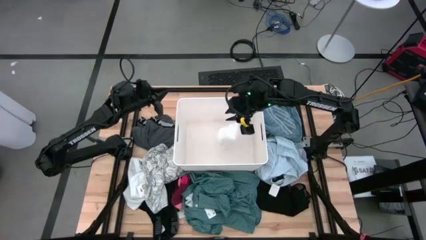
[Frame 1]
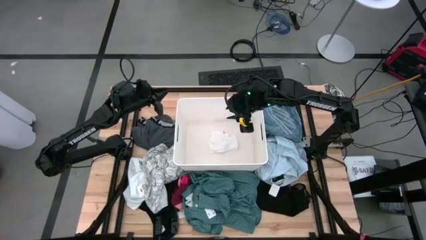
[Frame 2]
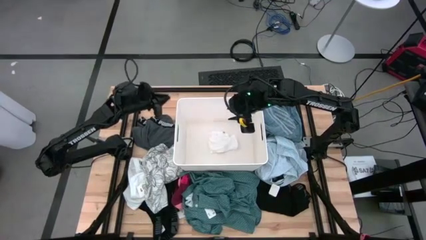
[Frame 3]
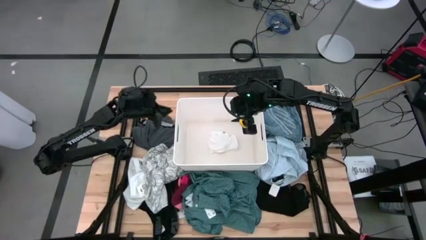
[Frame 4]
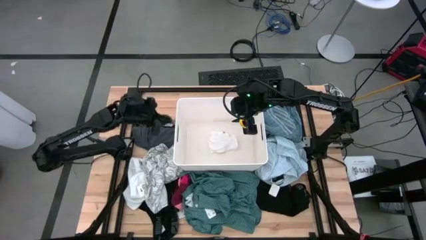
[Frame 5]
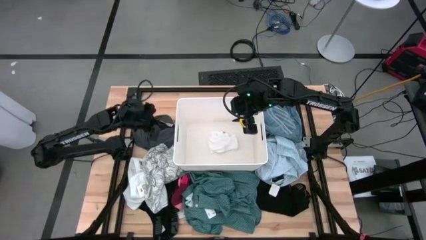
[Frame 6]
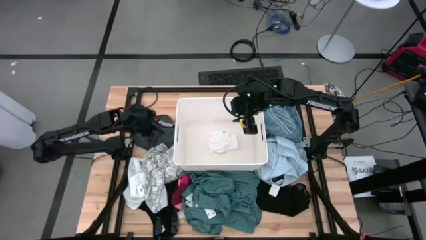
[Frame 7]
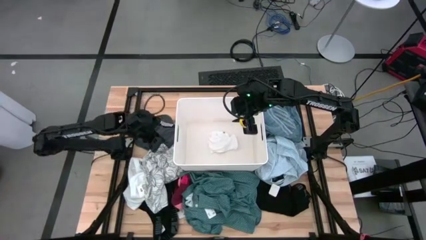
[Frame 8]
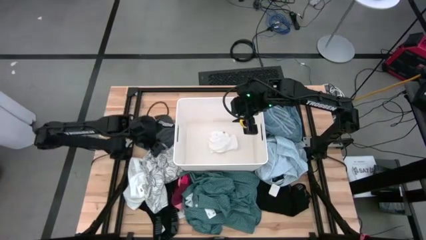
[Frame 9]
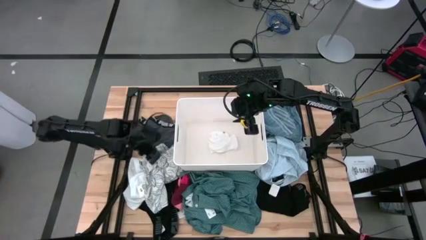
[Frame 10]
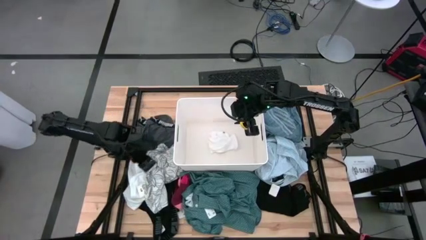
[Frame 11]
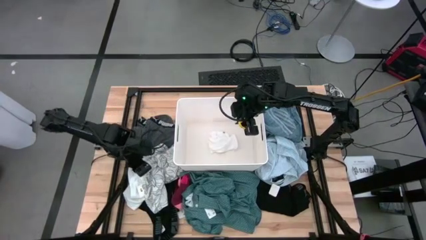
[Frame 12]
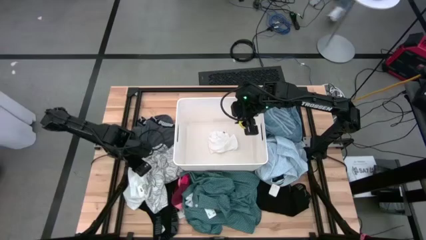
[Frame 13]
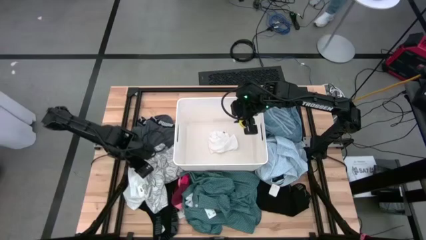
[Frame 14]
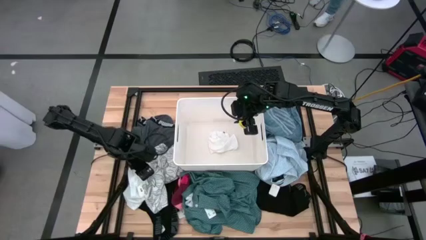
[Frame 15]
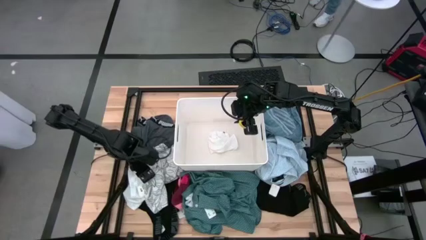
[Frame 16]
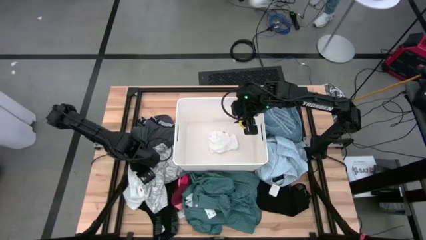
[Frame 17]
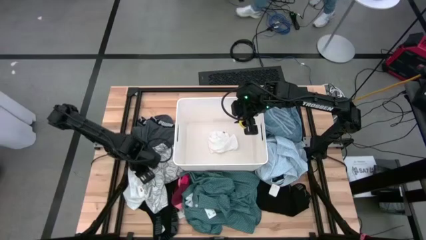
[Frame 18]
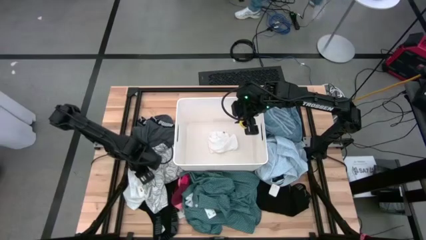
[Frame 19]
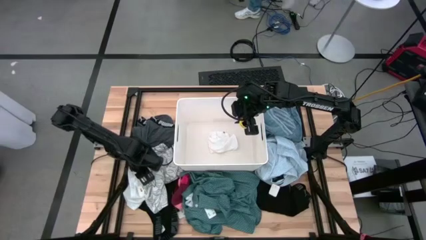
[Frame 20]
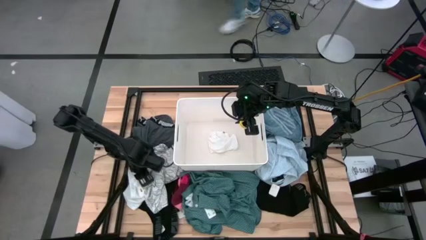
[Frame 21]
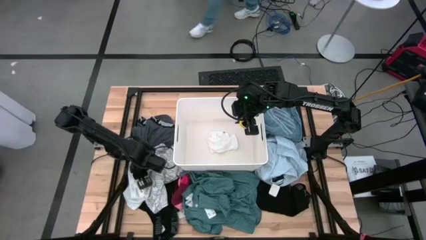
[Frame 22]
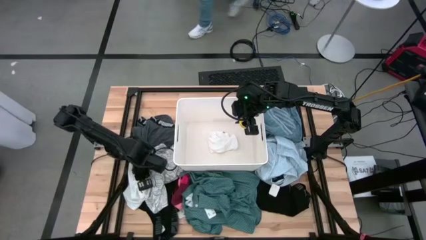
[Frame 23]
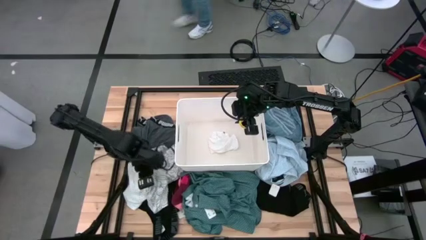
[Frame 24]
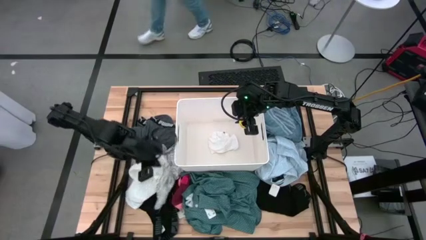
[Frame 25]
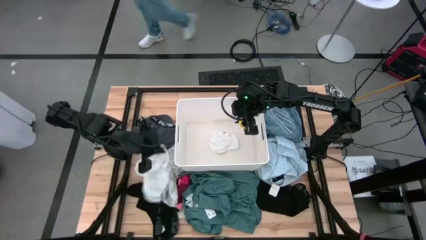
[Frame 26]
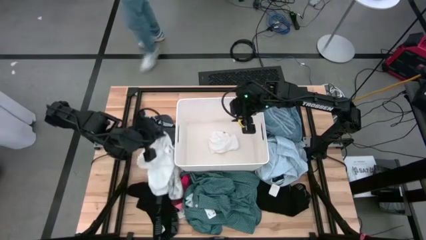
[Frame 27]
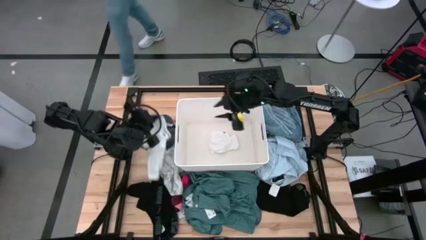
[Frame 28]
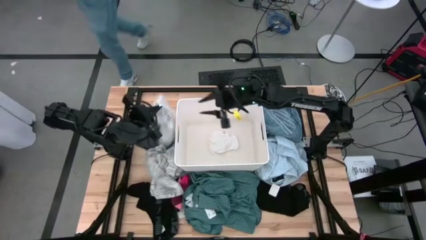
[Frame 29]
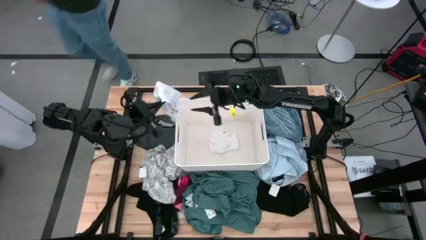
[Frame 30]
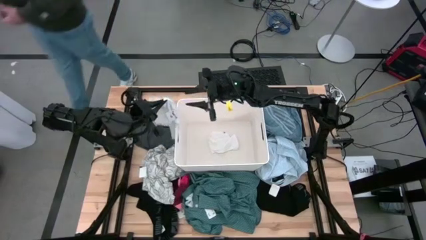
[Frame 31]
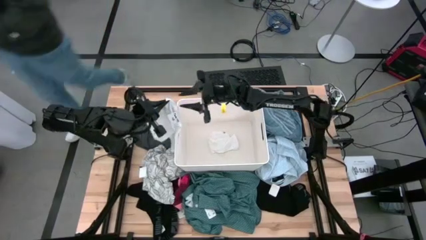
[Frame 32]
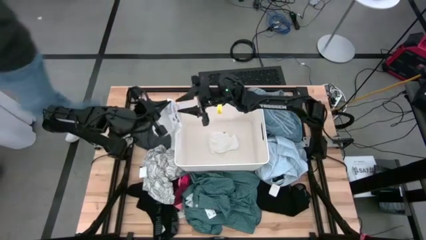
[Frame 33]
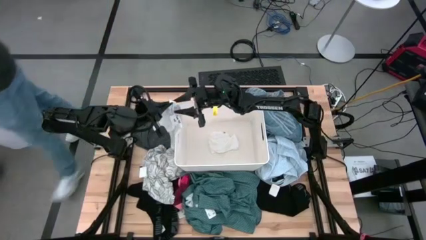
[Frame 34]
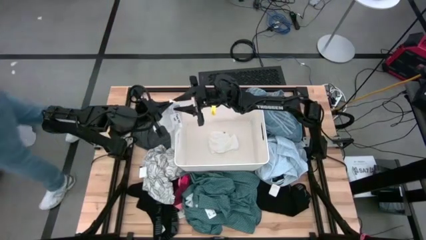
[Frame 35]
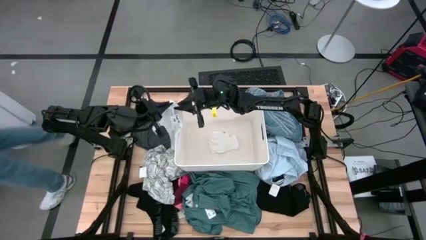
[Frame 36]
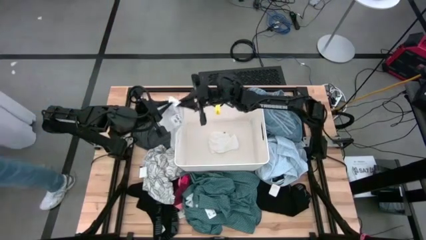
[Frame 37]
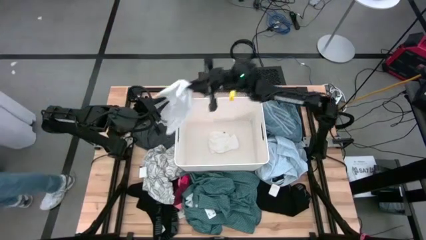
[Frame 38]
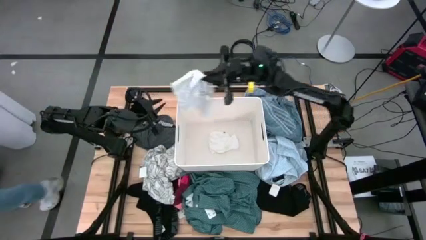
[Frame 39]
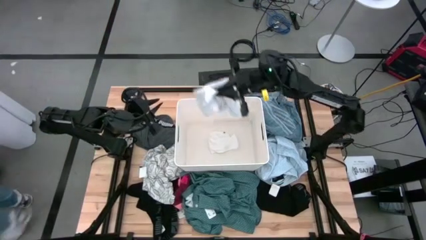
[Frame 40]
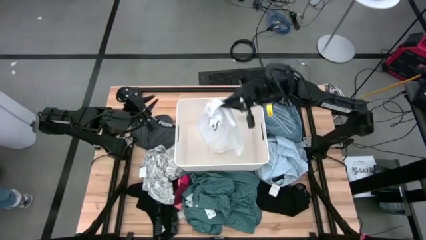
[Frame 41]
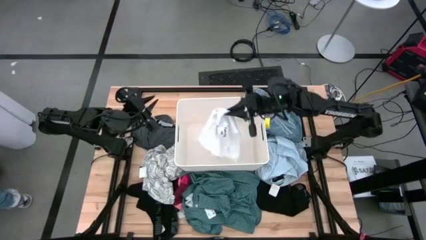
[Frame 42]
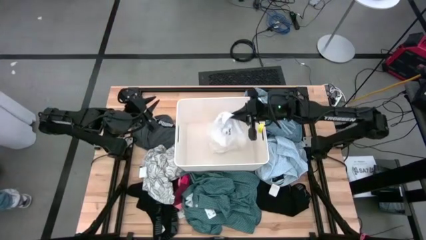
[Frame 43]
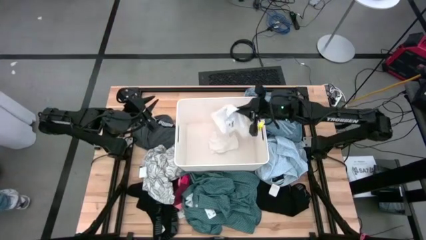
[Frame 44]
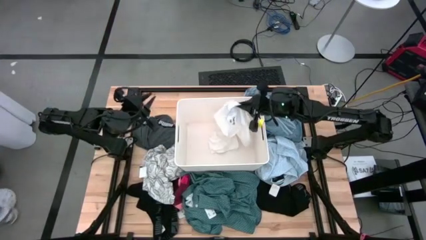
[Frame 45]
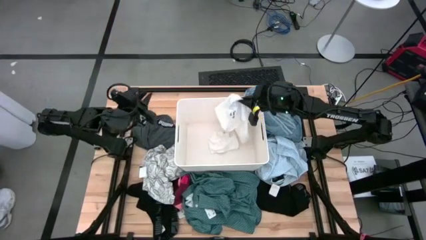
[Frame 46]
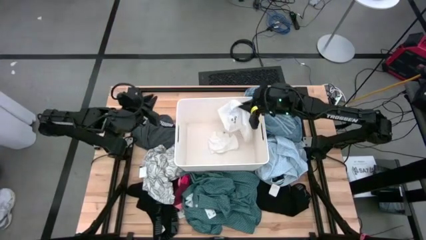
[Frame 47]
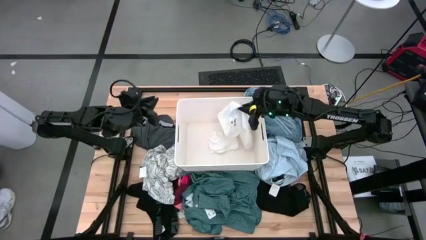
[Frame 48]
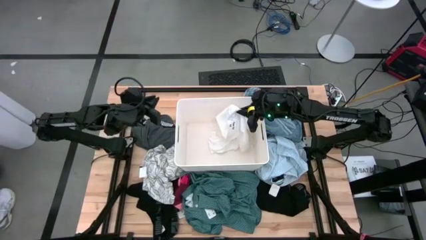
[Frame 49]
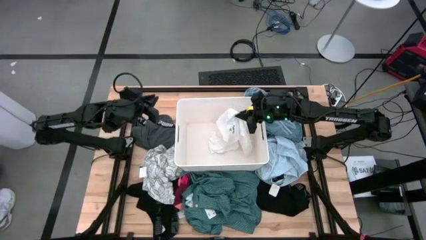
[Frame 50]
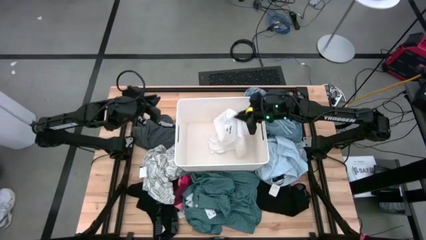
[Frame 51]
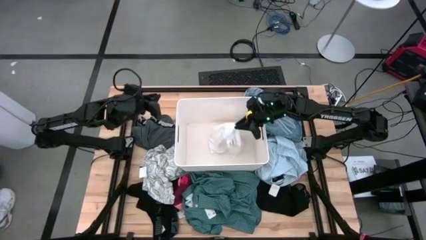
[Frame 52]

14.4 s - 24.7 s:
Task: Sort clothes
Put the white underwear into the white laundry organizer

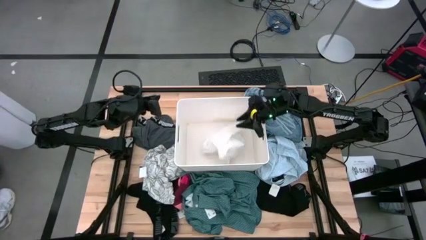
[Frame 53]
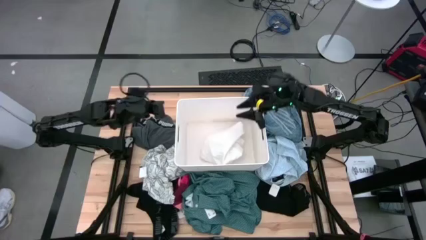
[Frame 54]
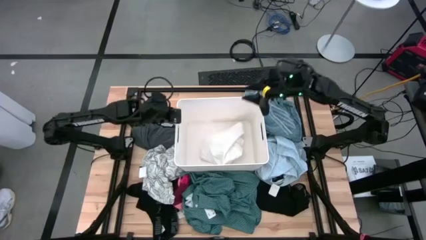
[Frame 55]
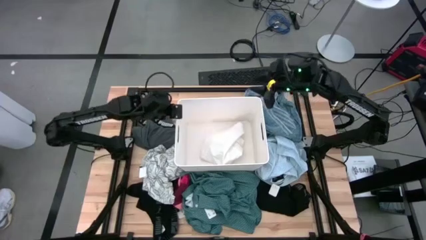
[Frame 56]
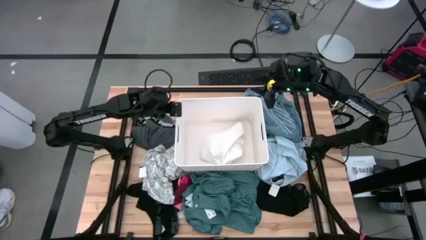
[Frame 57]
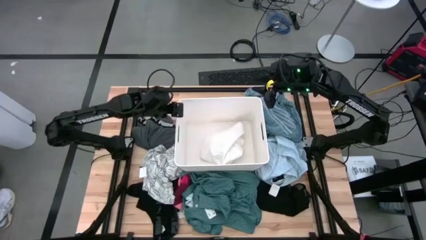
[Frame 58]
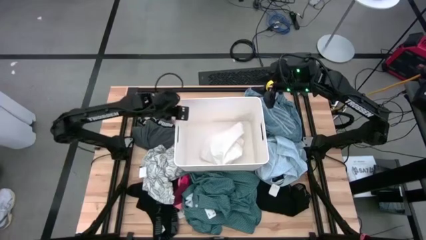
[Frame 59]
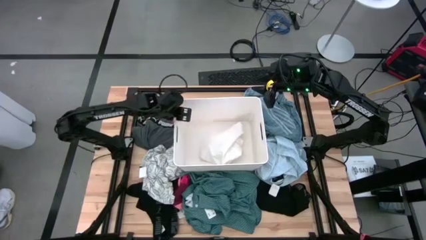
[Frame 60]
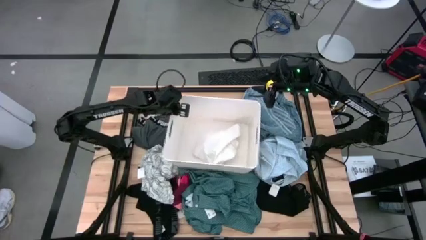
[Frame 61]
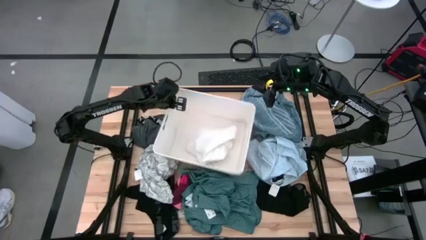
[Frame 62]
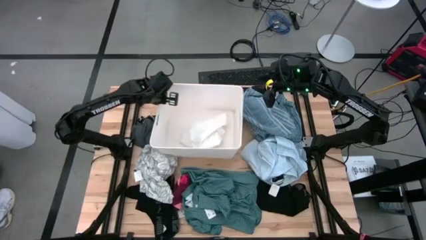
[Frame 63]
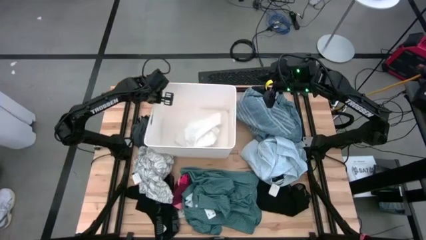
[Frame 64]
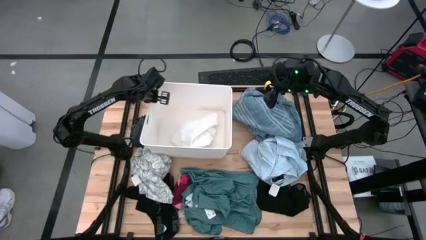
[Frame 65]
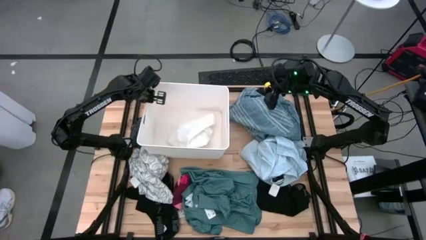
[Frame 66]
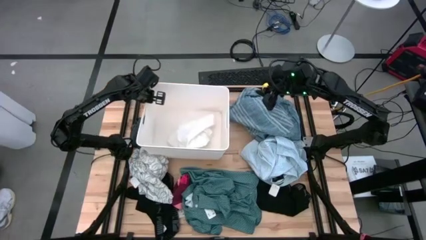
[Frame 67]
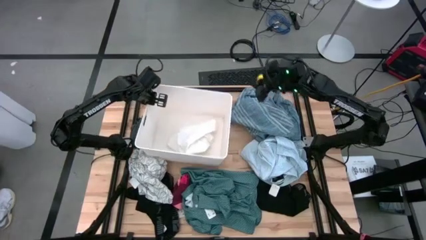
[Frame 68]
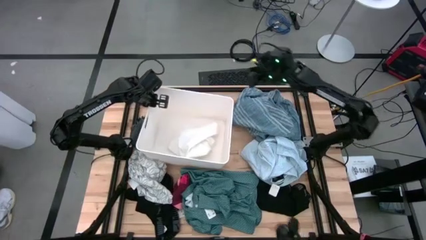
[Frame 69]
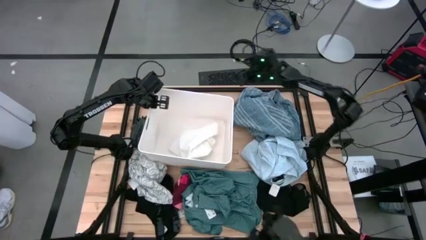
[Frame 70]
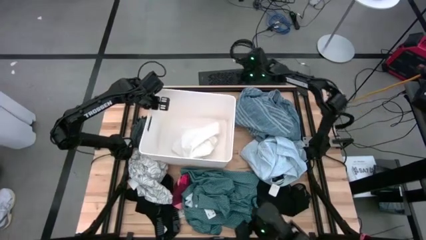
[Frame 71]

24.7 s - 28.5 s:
Put the white sock into the white laundry organizer

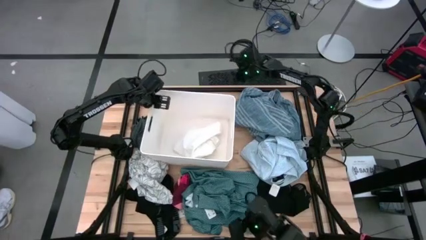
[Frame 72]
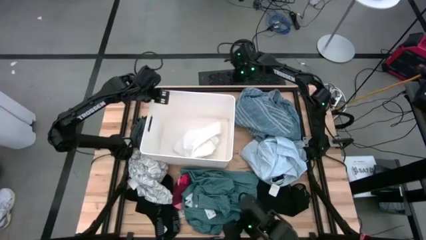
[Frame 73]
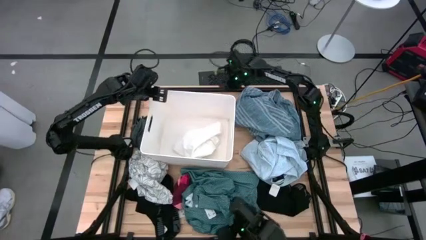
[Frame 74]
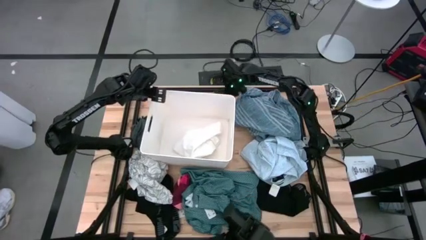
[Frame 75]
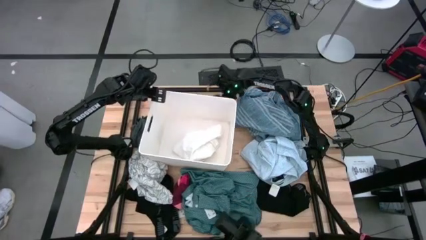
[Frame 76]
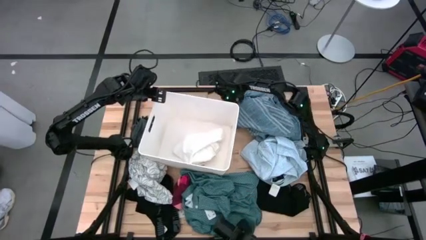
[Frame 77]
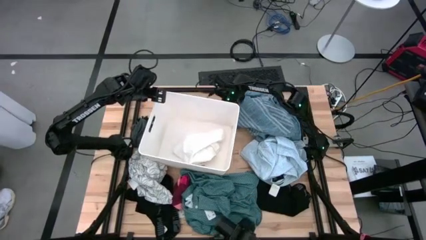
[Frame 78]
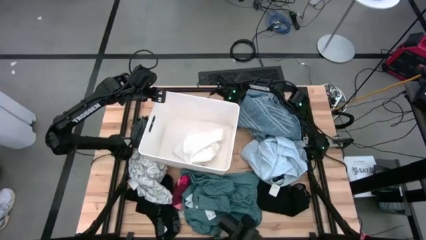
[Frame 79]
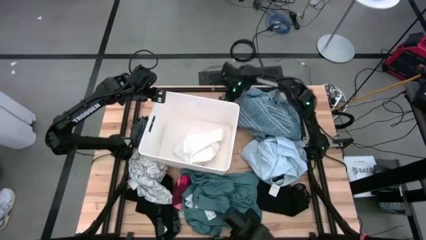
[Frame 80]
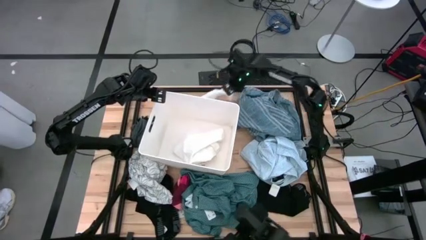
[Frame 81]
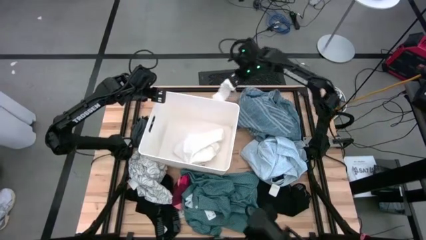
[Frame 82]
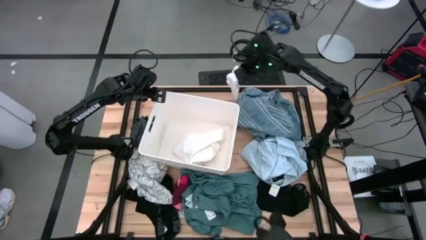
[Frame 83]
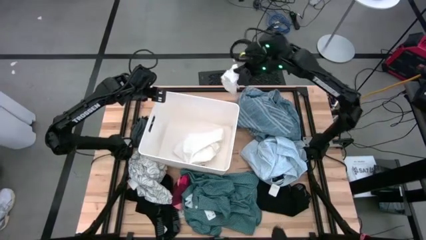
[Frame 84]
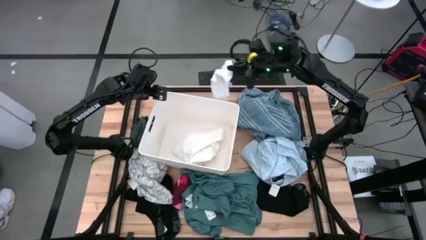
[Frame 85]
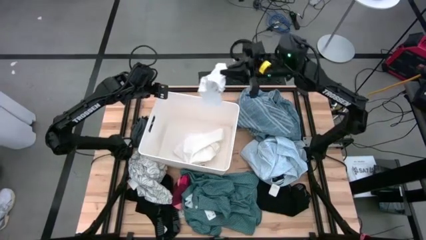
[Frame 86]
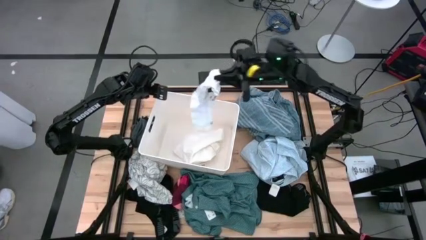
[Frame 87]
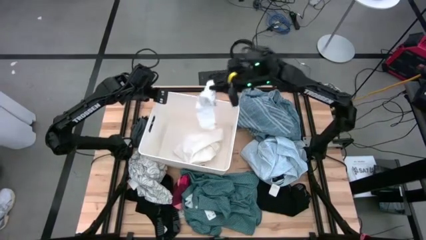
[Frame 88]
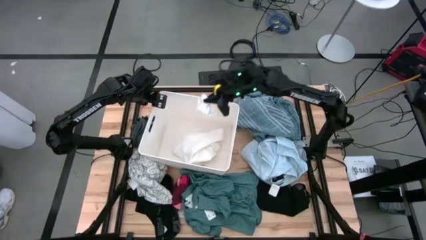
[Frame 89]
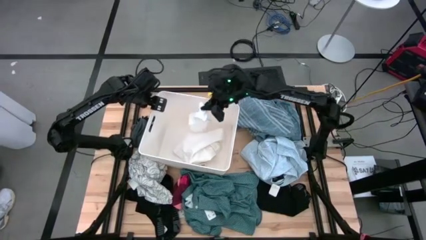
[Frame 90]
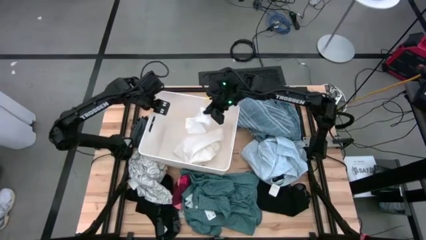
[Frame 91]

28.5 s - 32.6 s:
Adjust the white laundry organizer on the table
